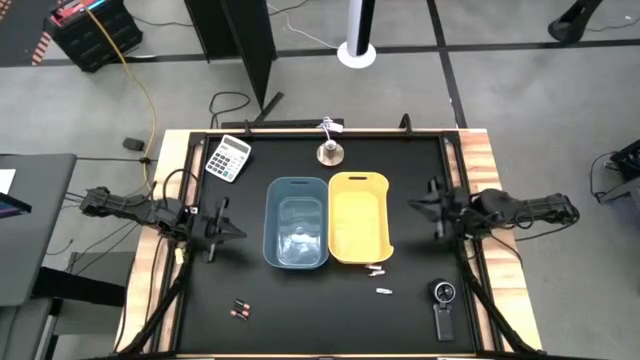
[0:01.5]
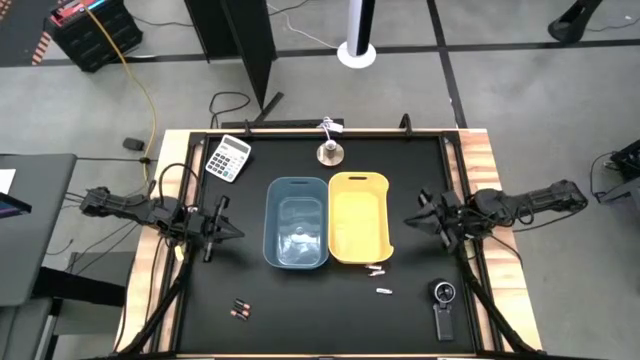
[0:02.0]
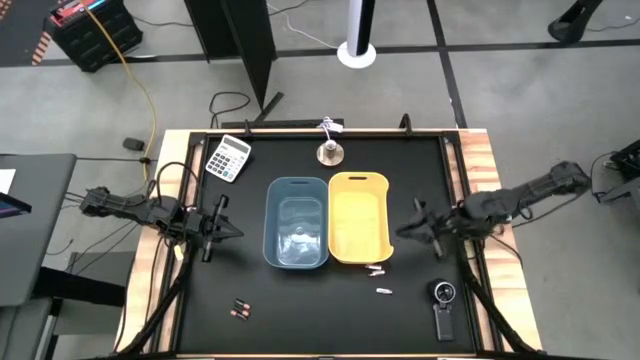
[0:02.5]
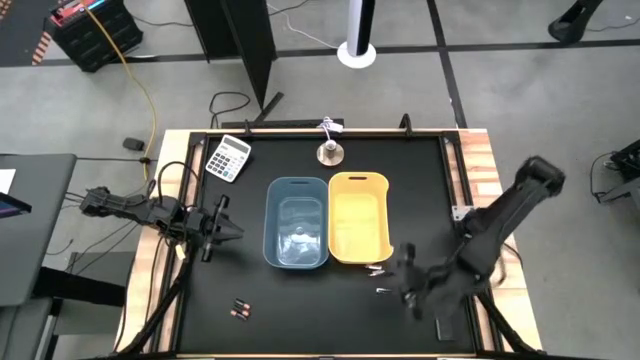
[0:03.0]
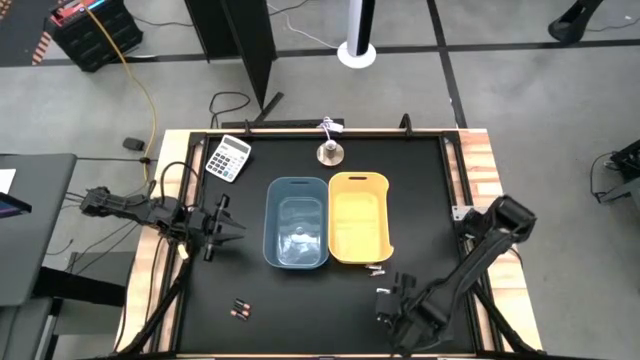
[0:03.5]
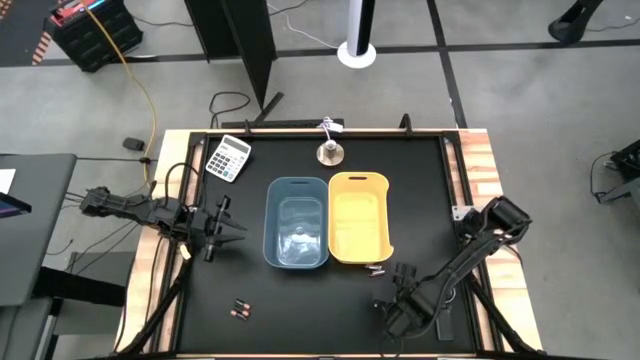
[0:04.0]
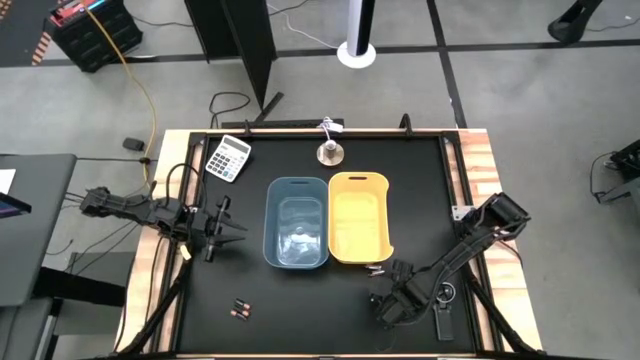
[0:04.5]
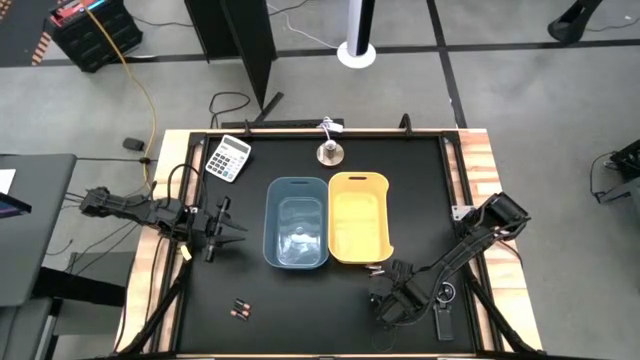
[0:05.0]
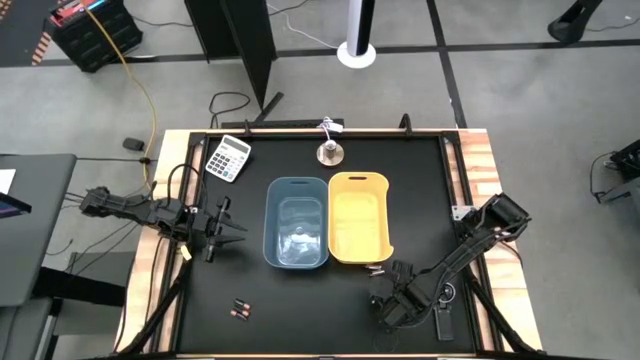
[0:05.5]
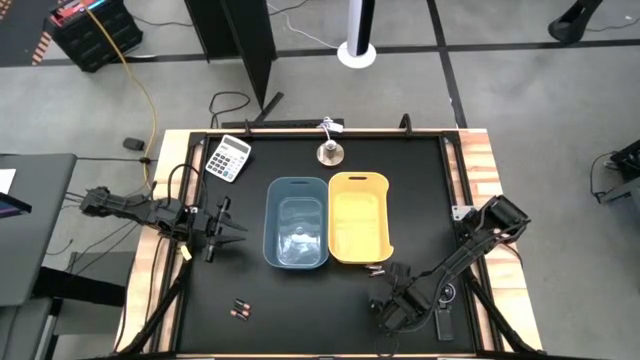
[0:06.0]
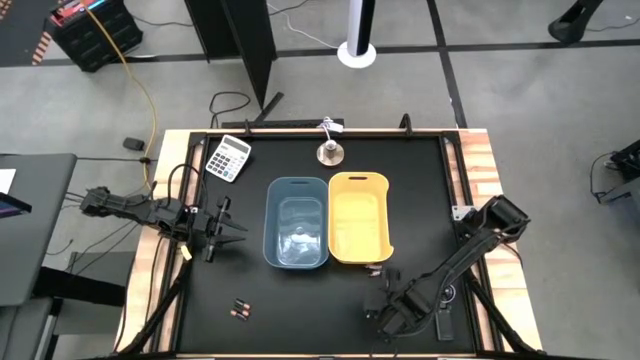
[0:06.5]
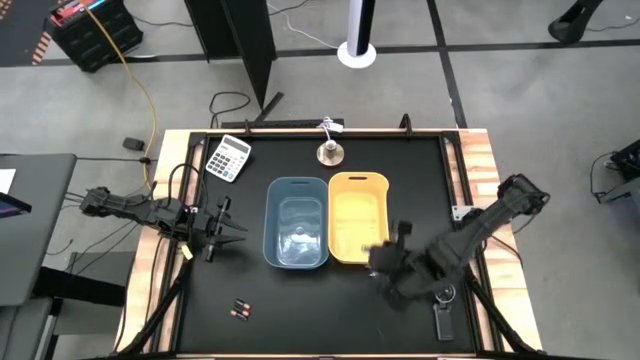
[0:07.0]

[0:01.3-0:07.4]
Task: Sort batteries
Put the silver battery into the yellow bin

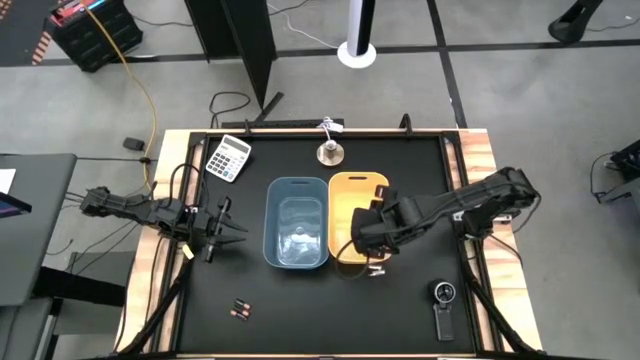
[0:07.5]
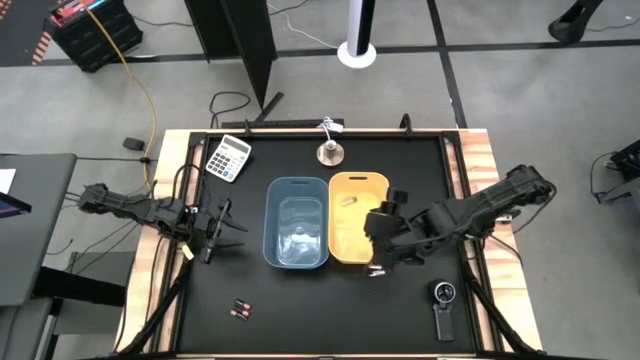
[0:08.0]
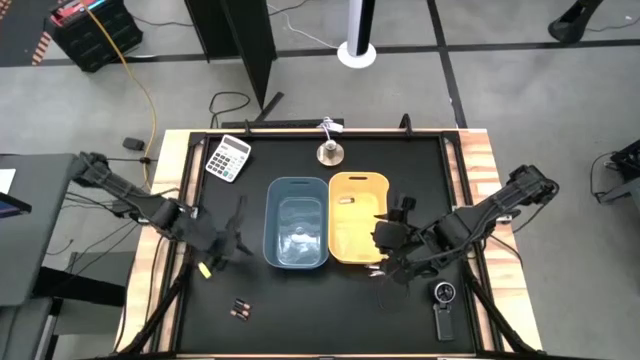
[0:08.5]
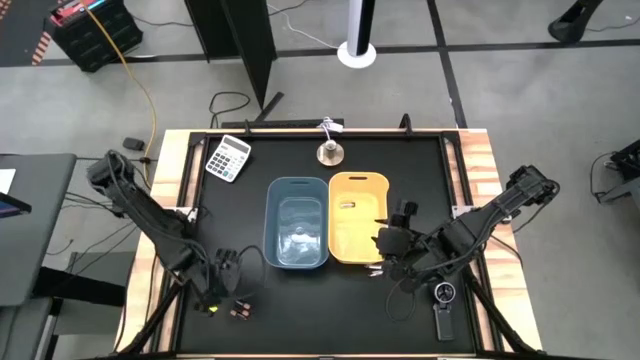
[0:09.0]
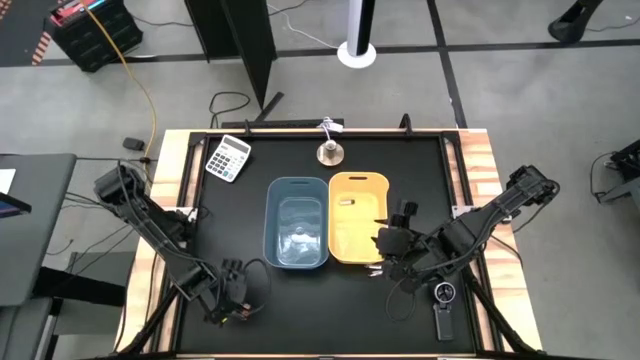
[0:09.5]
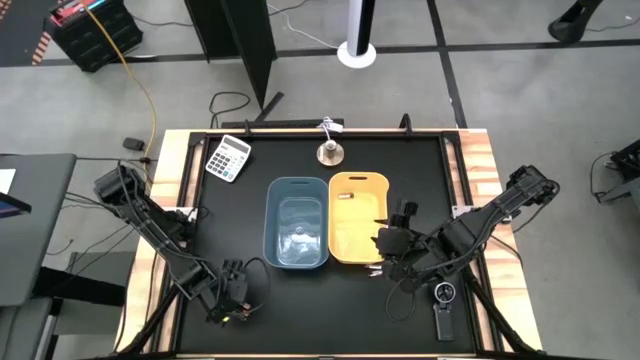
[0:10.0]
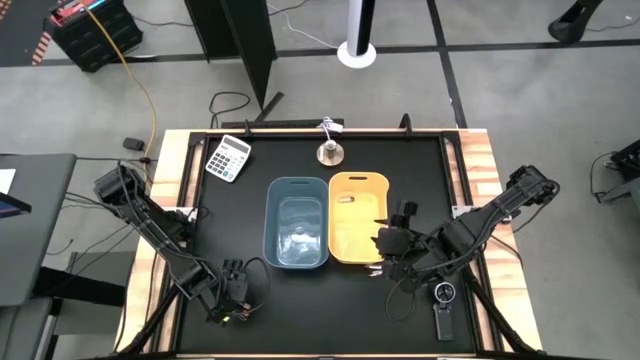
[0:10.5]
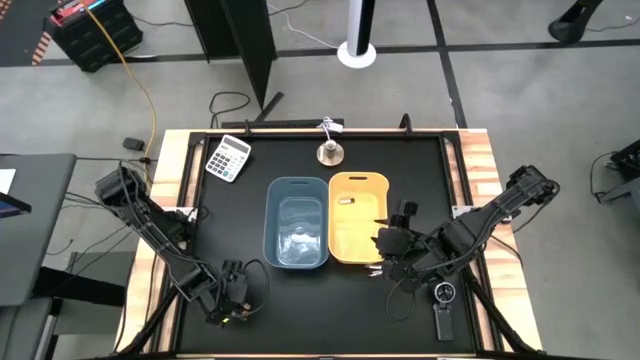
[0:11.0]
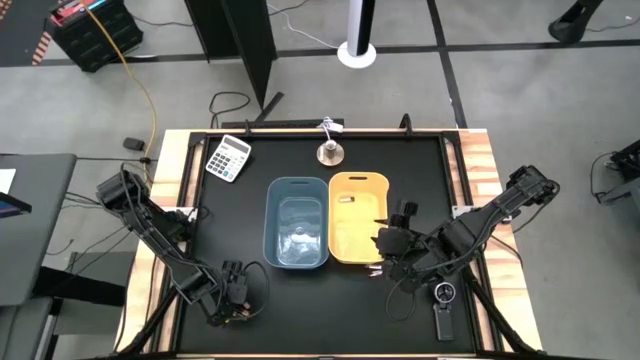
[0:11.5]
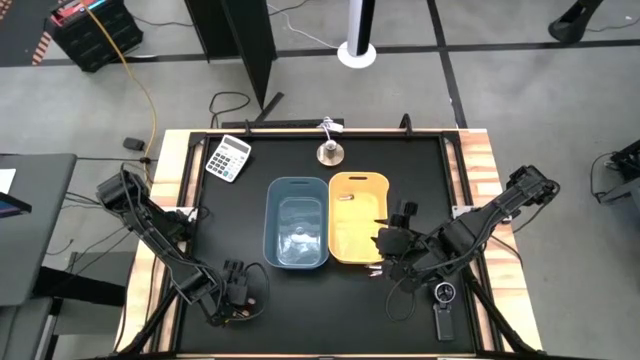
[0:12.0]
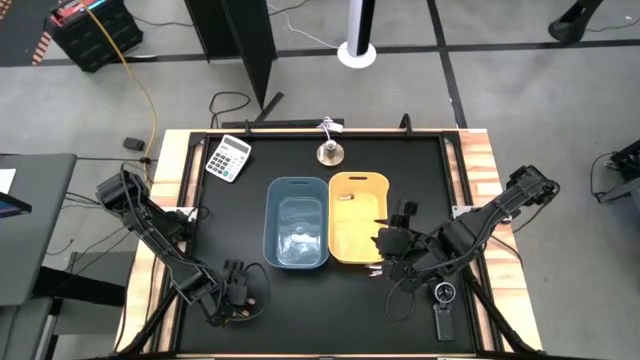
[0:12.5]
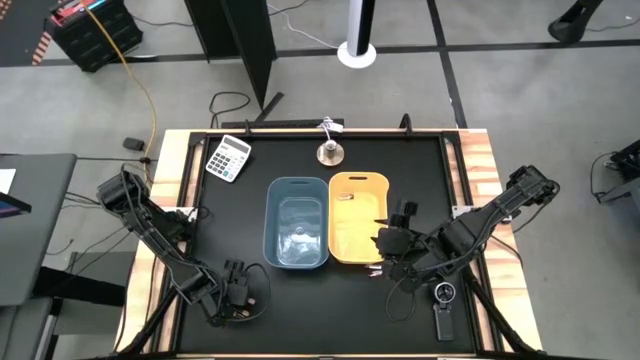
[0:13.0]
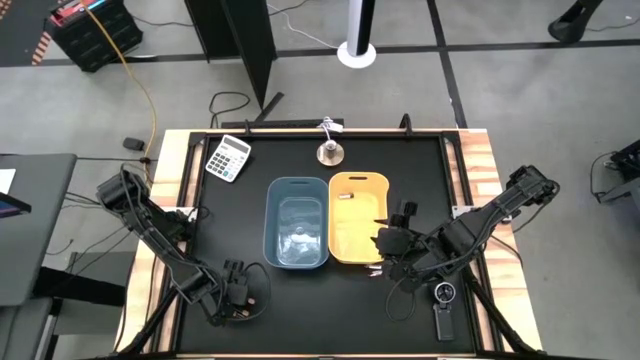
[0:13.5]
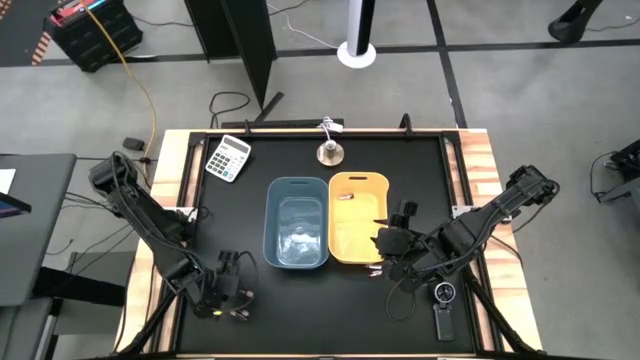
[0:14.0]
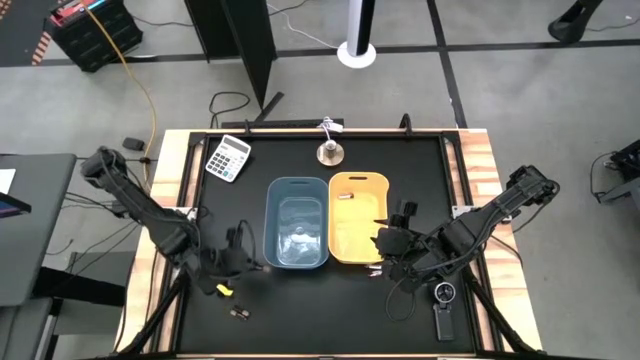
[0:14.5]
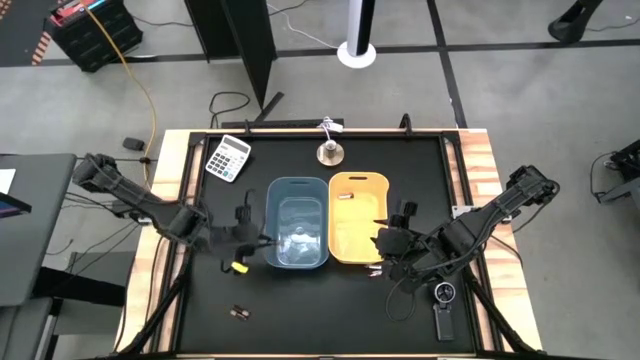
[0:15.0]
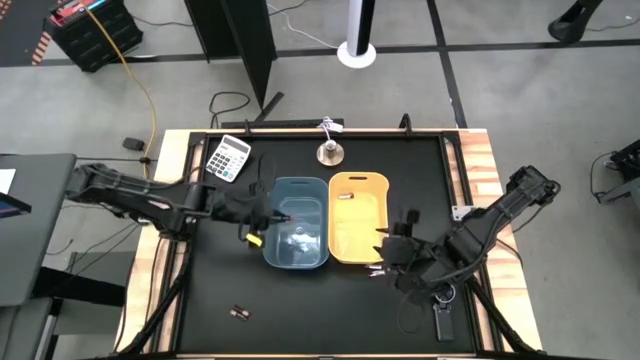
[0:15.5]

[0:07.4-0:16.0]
Put the black battery into the blue bin

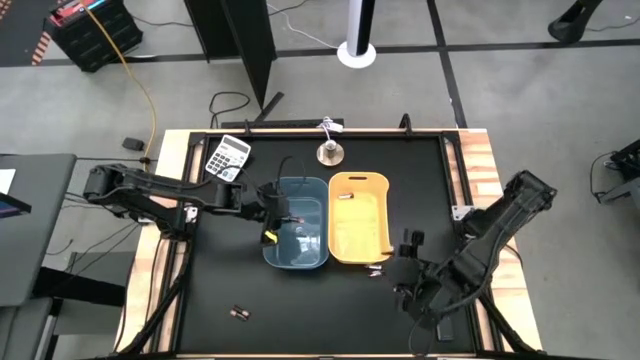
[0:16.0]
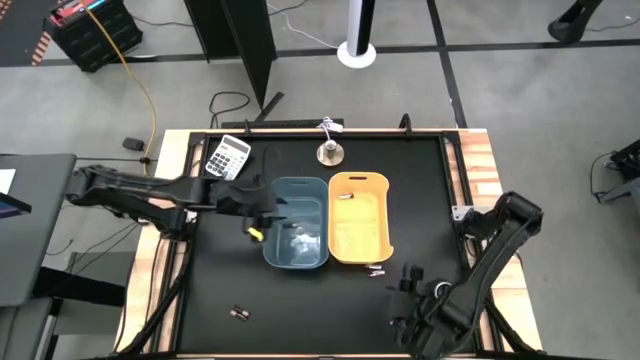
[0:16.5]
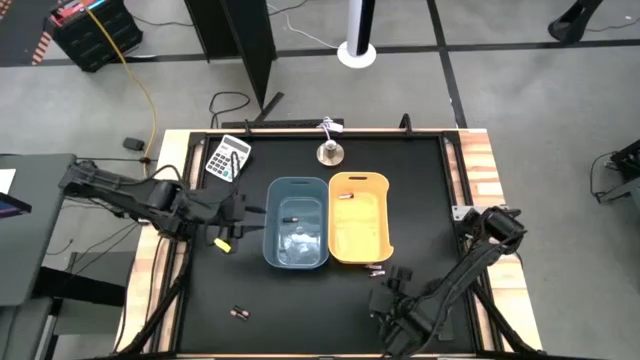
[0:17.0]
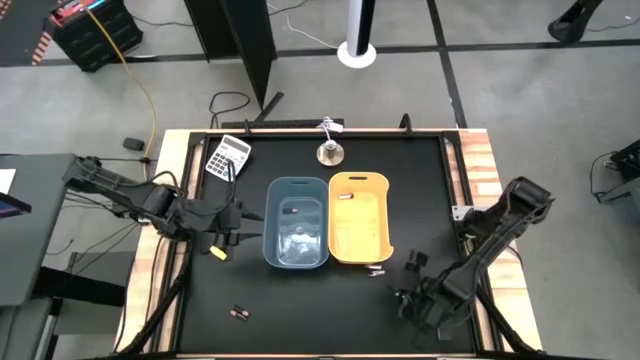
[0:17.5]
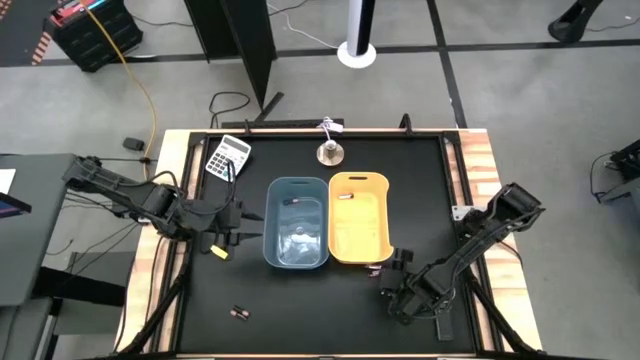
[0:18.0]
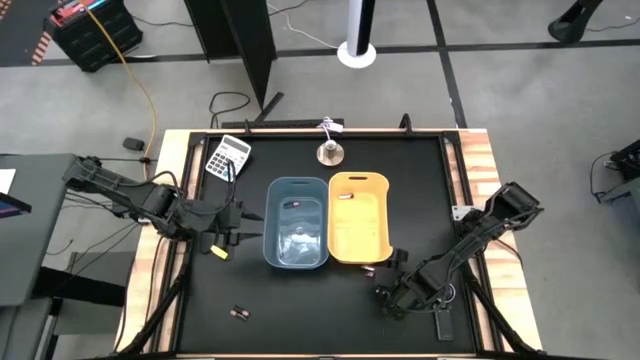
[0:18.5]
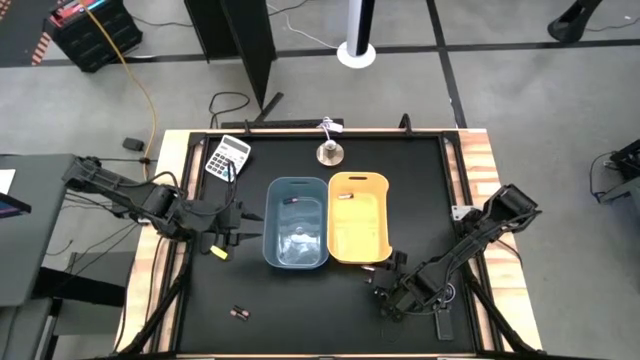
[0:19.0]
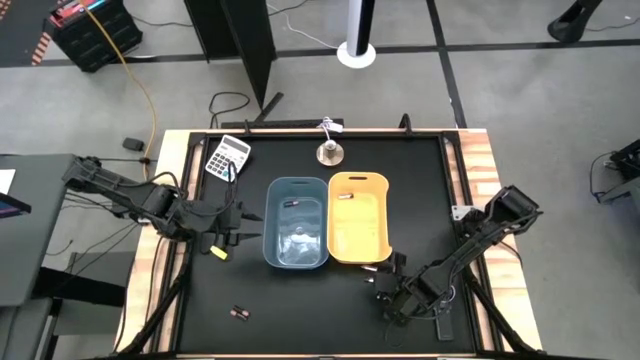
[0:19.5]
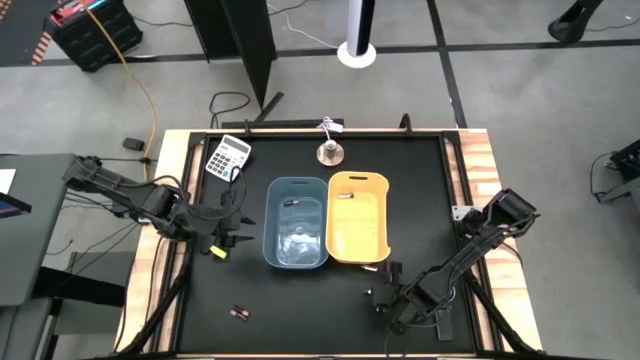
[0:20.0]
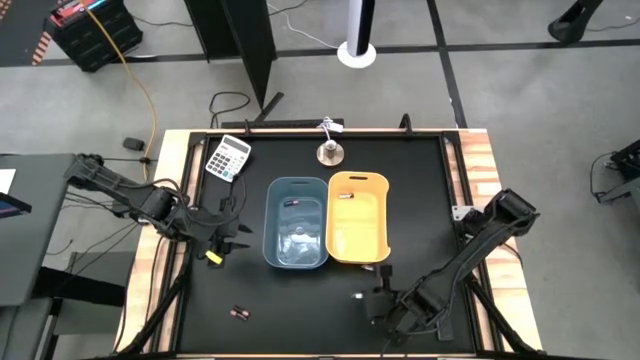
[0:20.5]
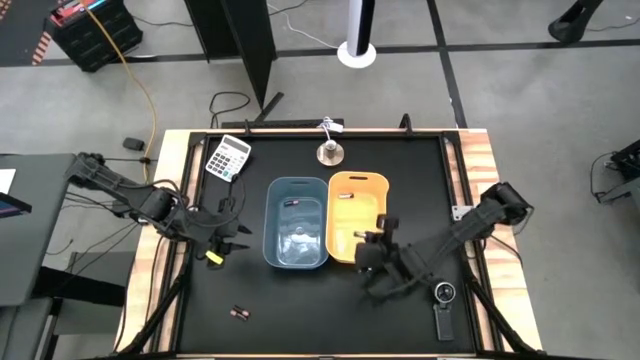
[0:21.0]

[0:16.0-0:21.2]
Put the silver battery into the yellow bin
